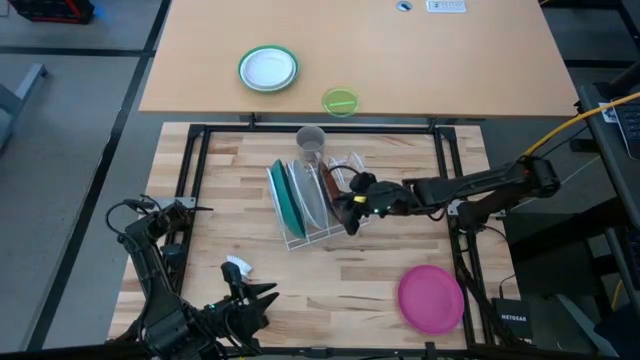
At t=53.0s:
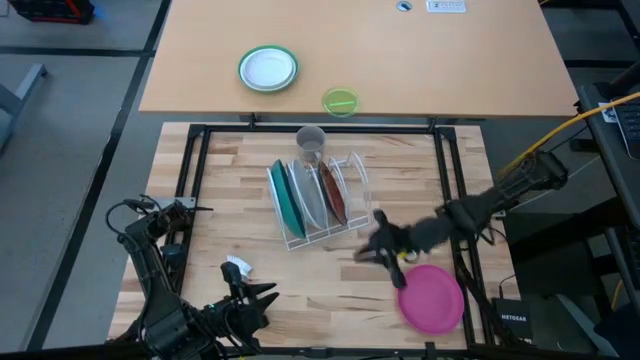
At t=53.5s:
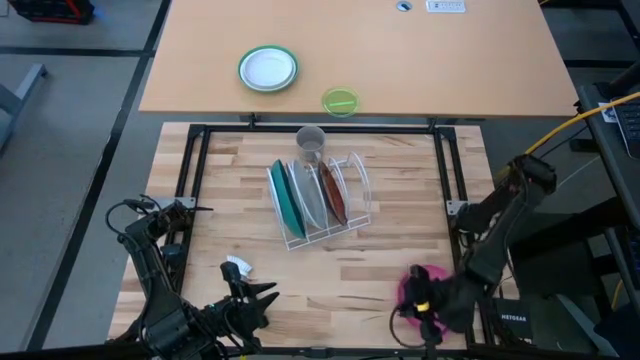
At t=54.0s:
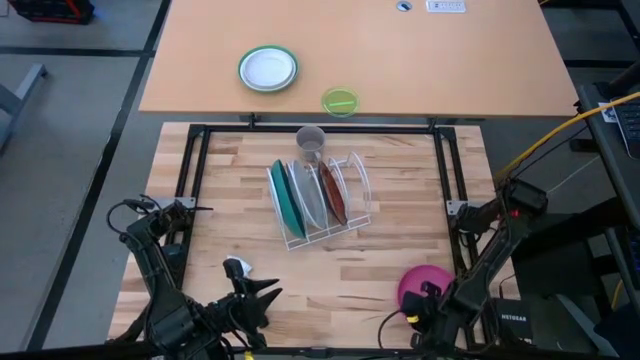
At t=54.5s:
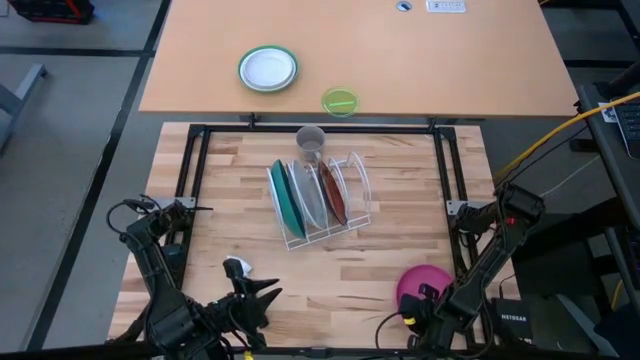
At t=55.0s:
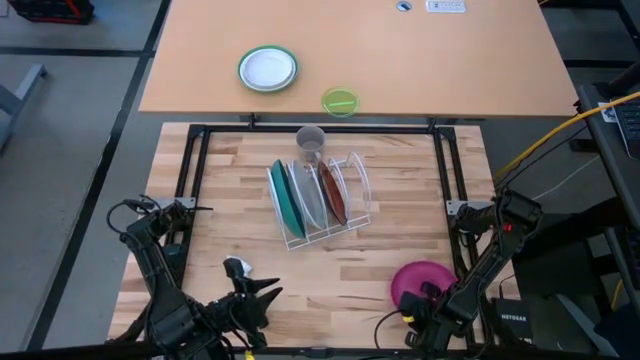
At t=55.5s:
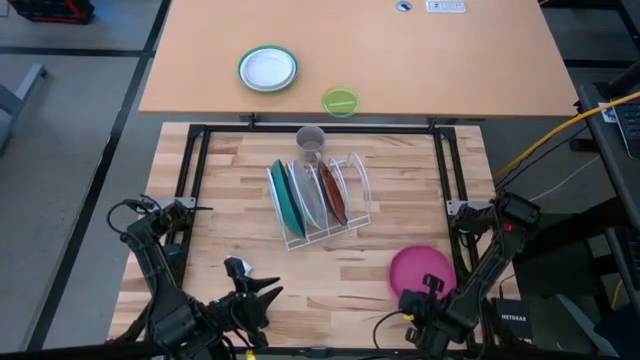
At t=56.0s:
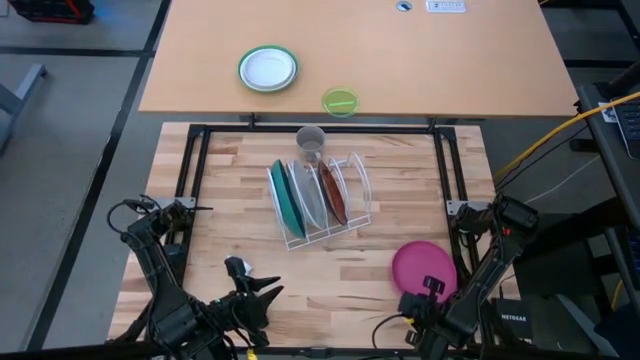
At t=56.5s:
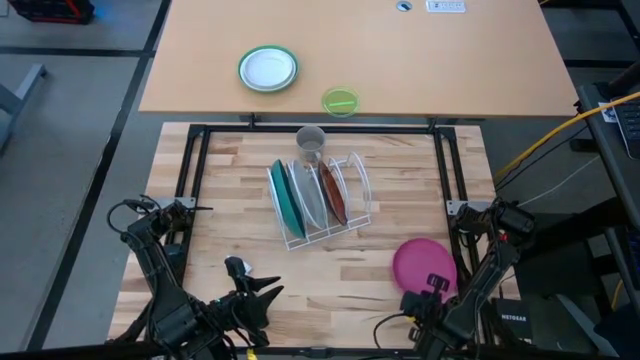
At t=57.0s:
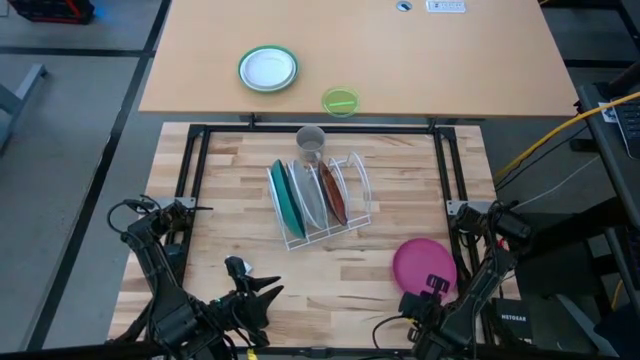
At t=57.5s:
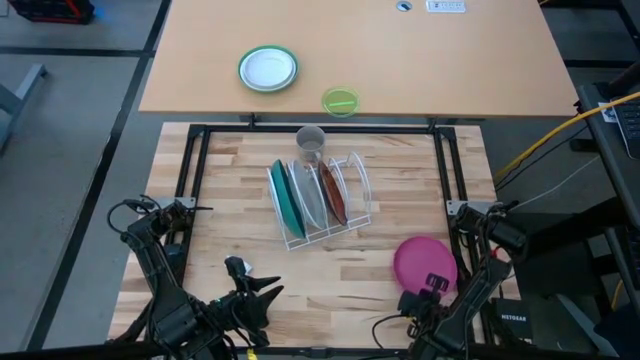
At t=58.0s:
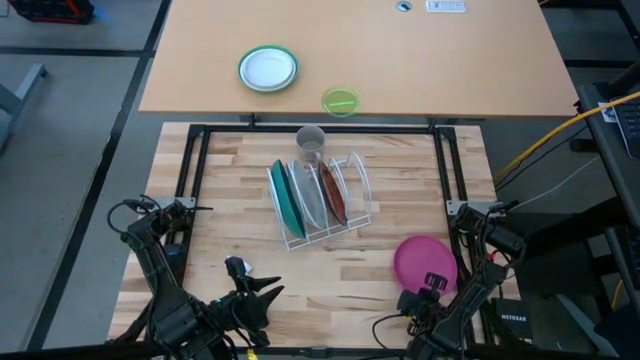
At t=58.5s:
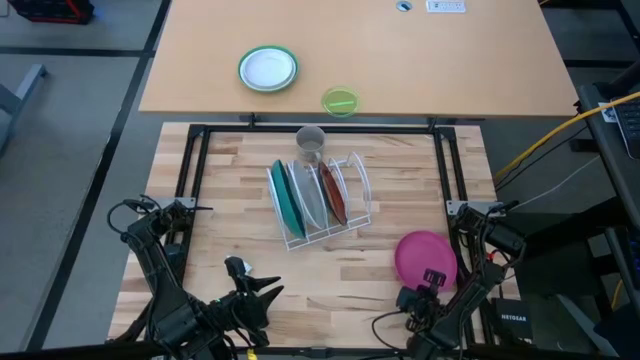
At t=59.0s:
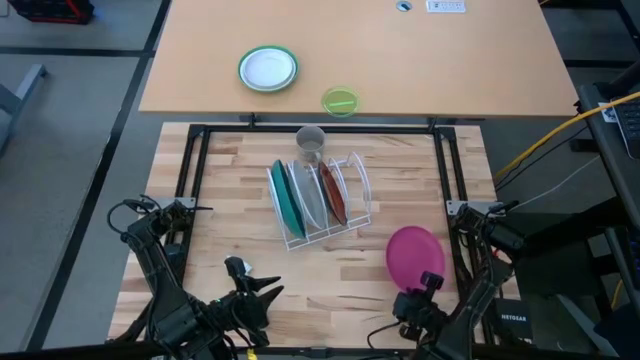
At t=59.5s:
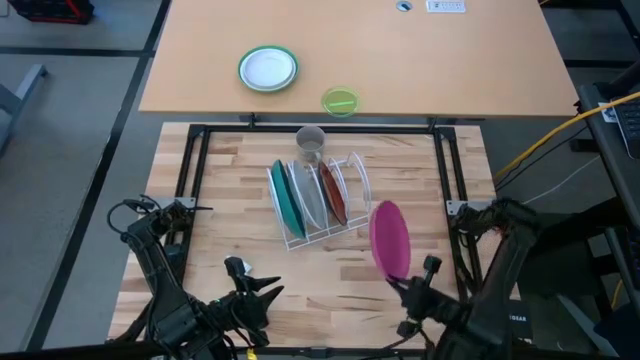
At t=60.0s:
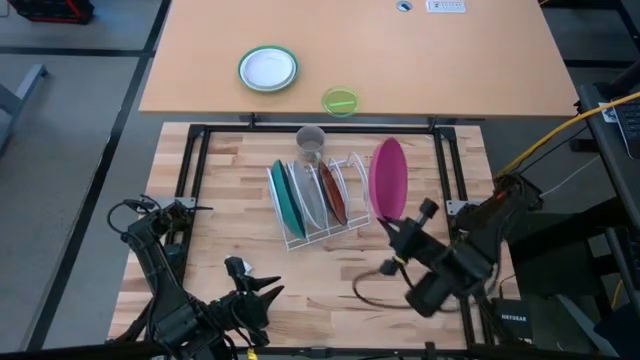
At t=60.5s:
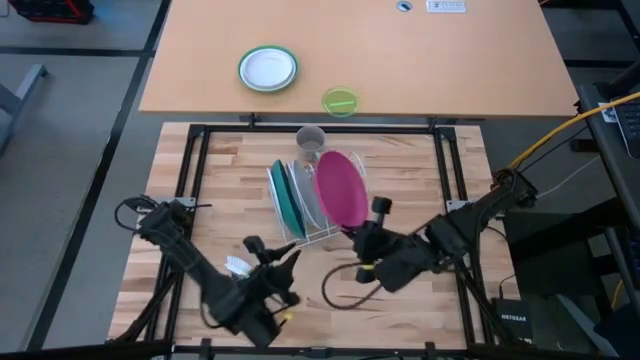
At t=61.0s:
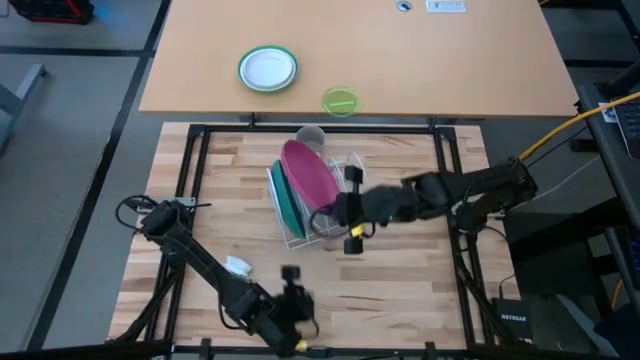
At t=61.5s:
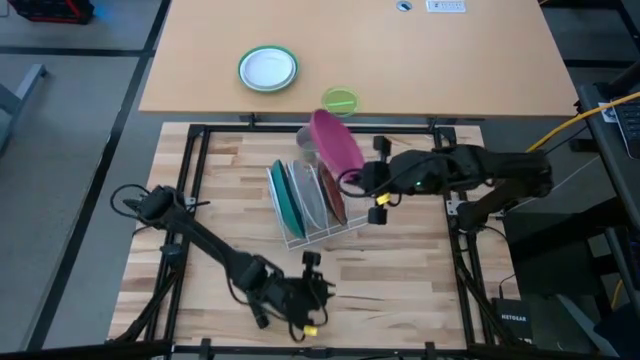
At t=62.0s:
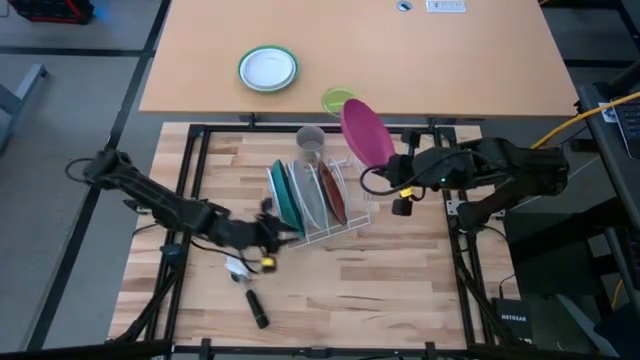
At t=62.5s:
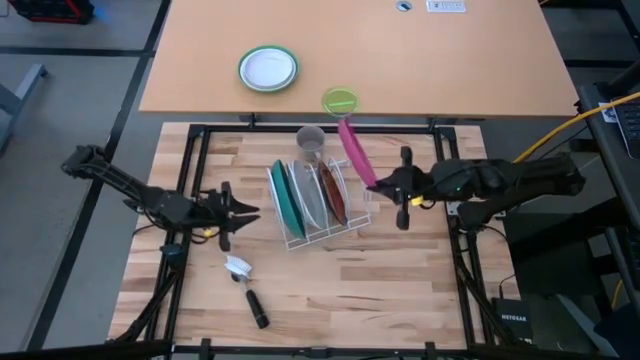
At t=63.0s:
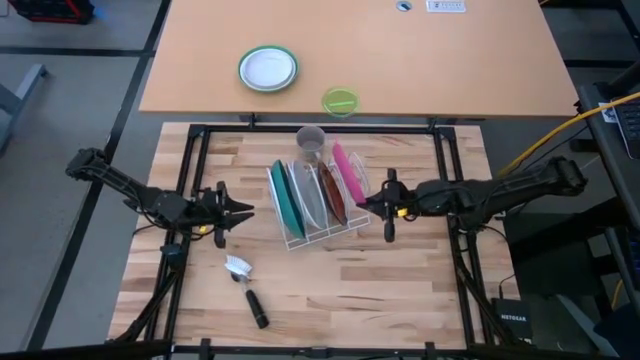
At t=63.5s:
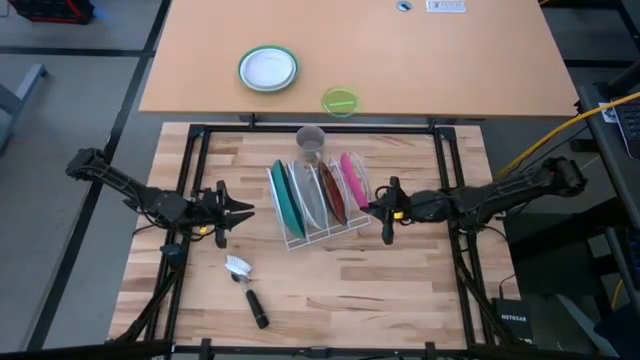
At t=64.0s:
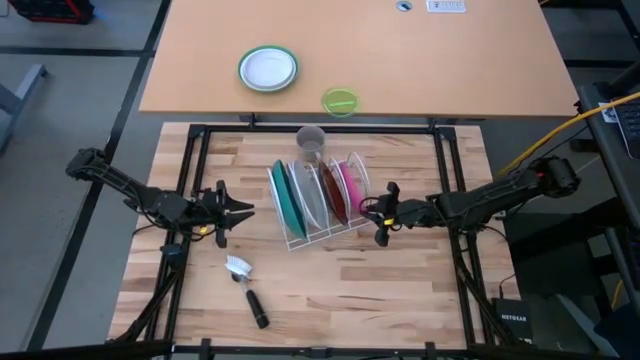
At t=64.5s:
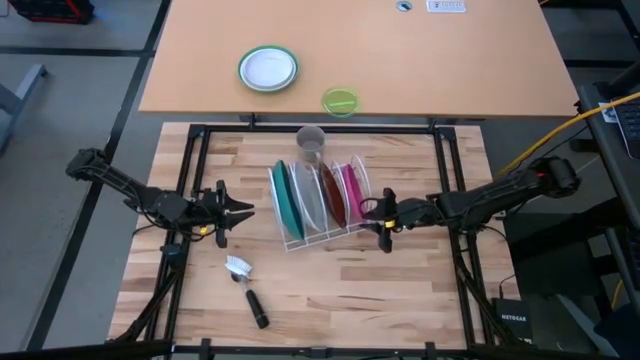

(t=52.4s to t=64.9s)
Task: Sort dishes
Put the pink plate into the dish rack

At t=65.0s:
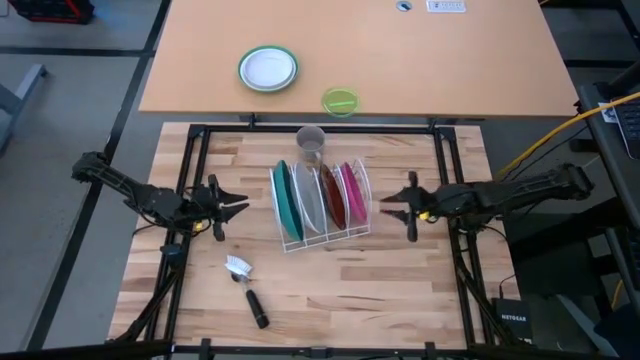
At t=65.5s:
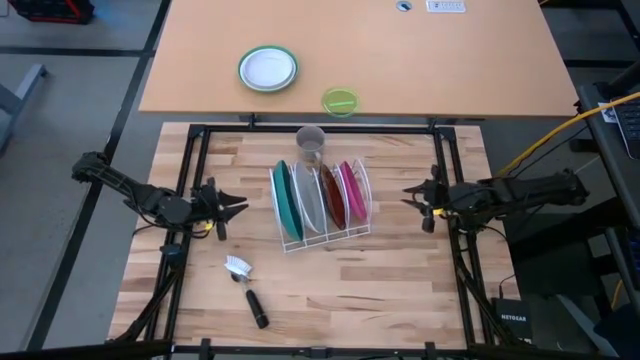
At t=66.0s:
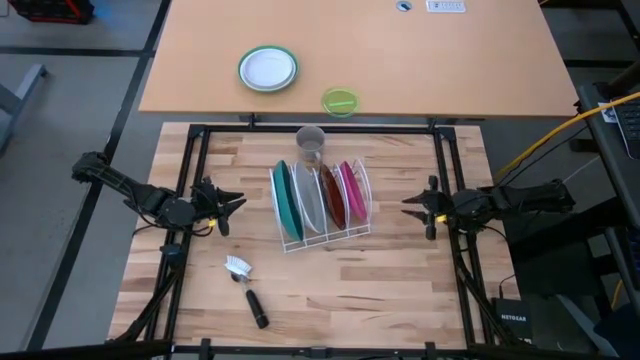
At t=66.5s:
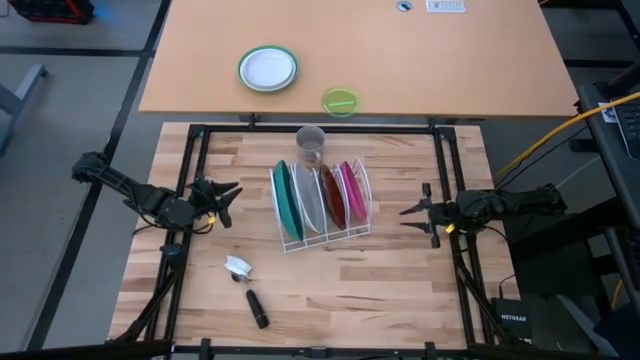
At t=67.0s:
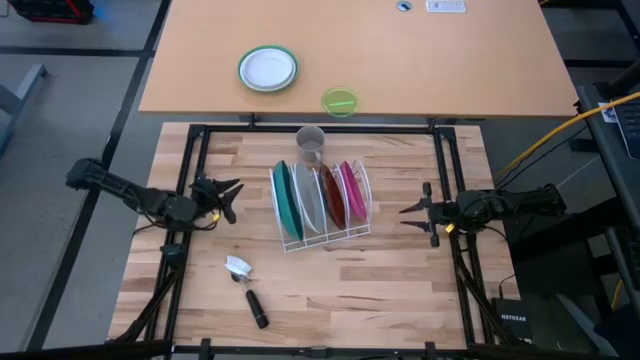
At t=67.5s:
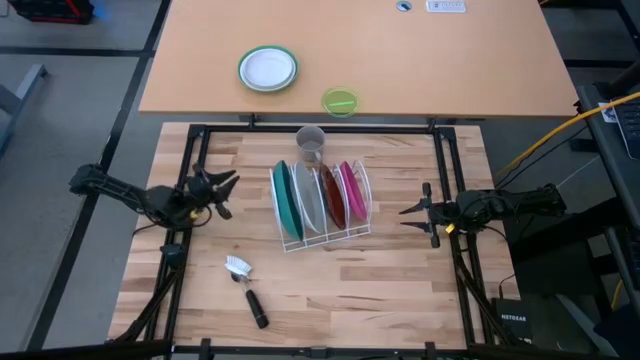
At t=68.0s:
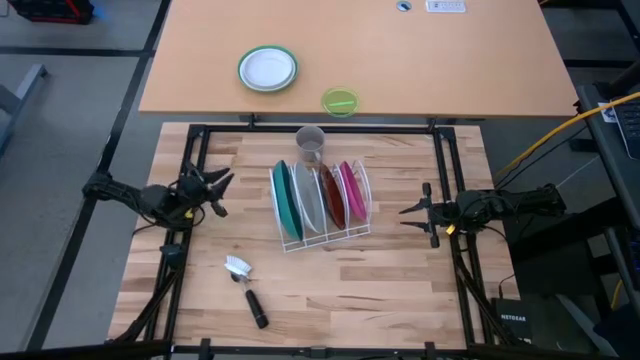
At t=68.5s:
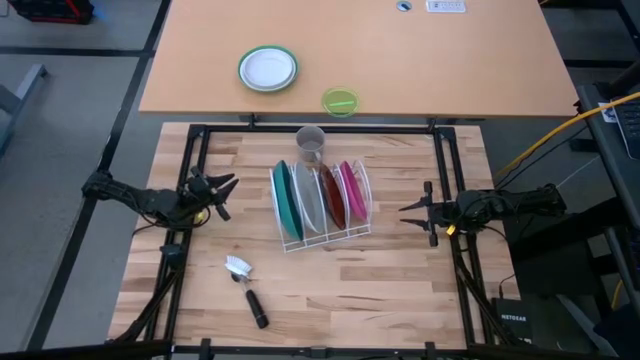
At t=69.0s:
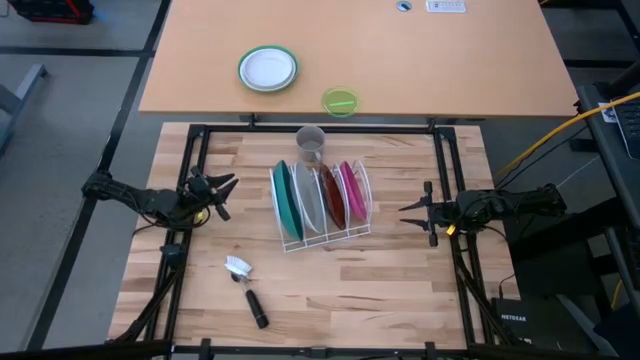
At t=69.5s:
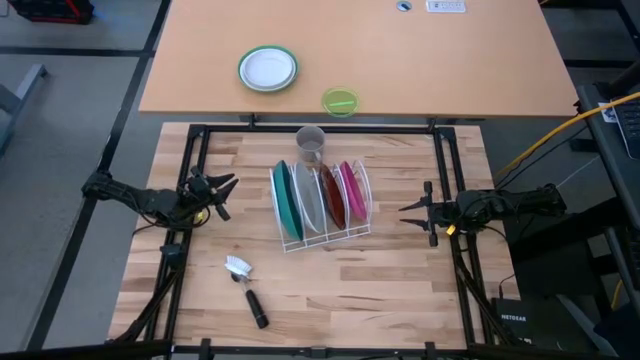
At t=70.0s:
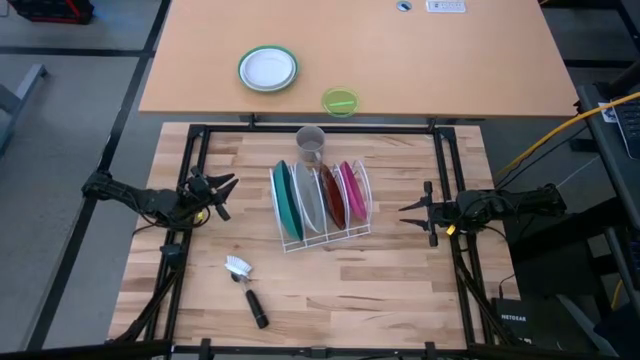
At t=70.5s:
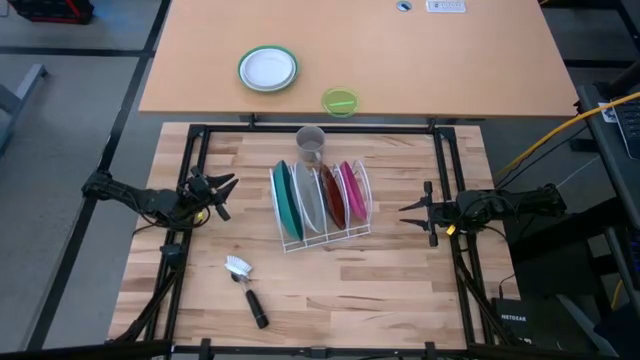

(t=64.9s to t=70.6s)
Return to Home Position

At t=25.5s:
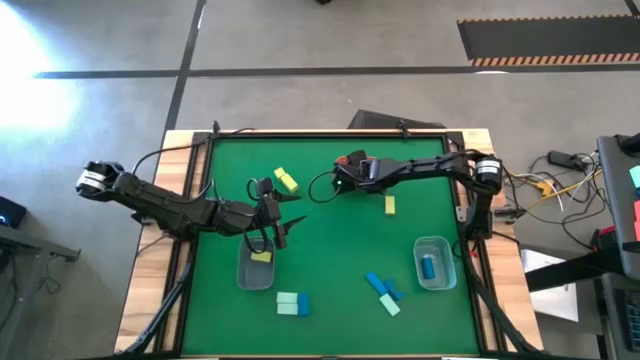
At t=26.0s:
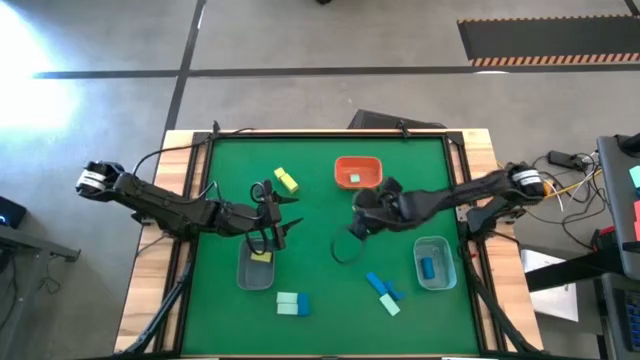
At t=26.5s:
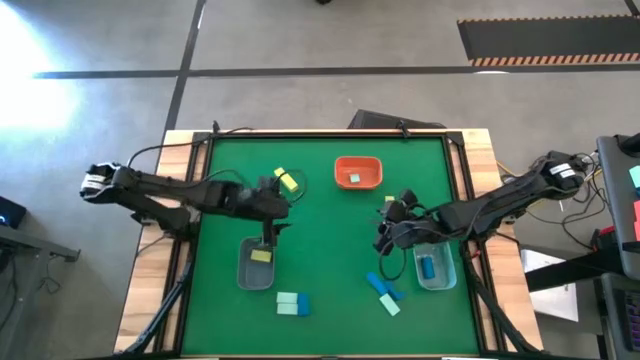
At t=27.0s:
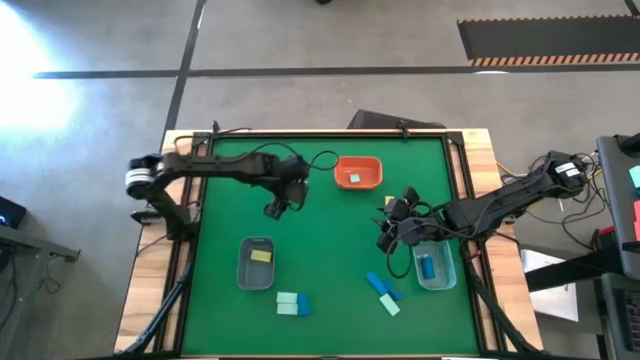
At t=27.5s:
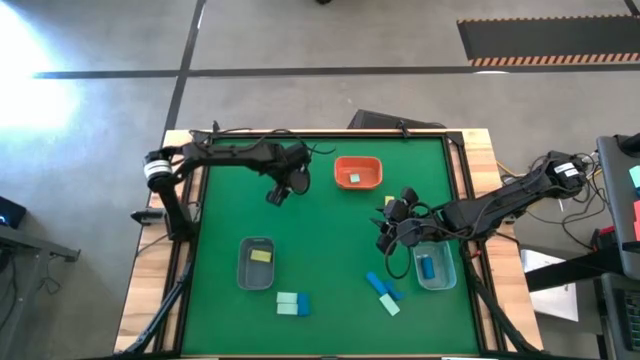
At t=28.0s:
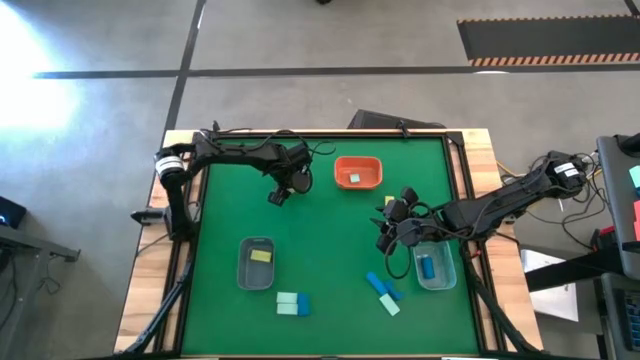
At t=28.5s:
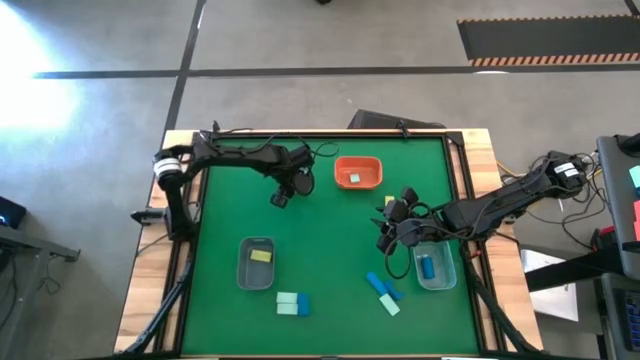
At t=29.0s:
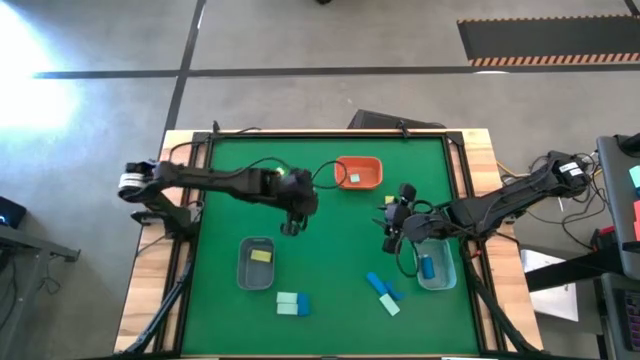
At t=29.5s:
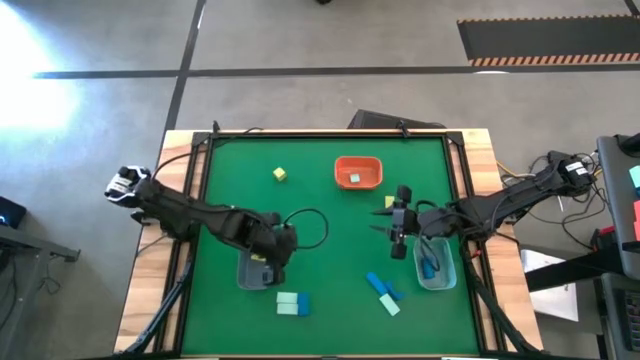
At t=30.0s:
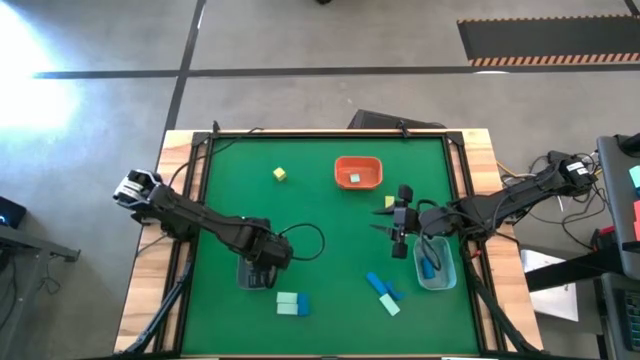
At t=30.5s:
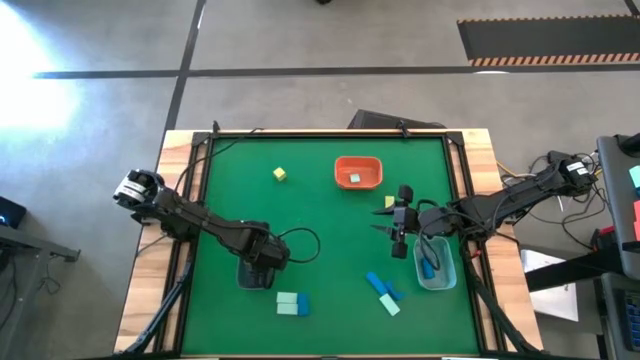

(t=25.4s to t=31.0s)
Task: Sort & place blocks by color
Put the light green block into the gray bin
